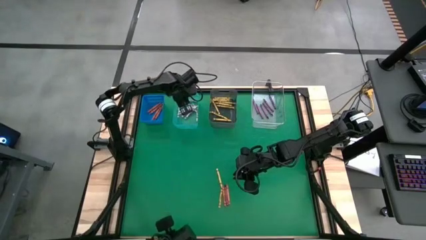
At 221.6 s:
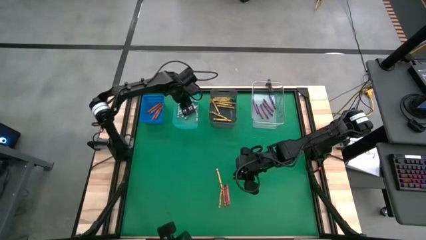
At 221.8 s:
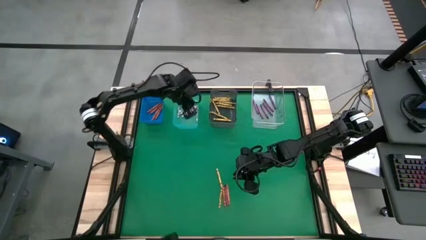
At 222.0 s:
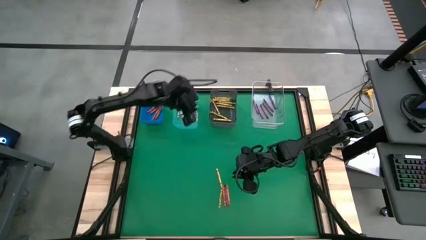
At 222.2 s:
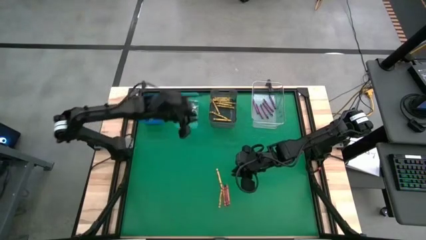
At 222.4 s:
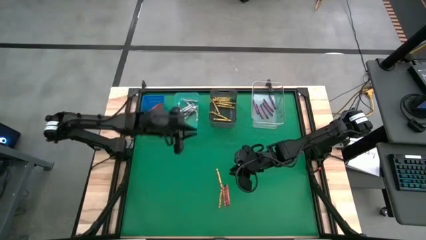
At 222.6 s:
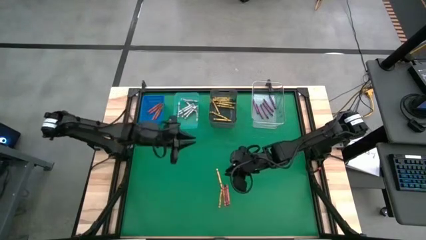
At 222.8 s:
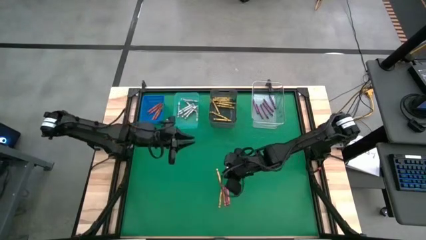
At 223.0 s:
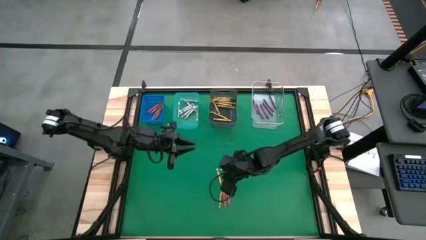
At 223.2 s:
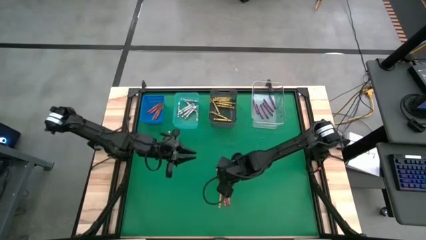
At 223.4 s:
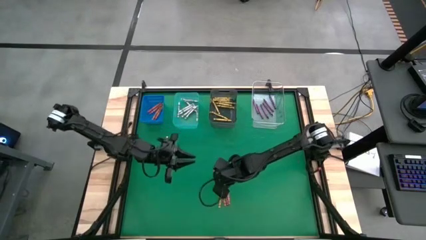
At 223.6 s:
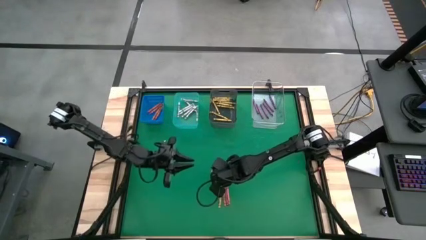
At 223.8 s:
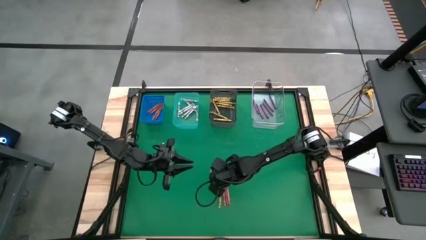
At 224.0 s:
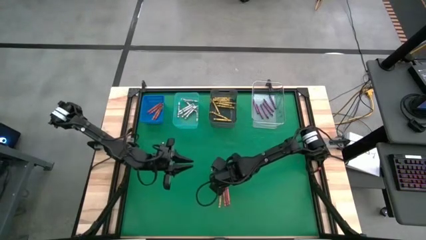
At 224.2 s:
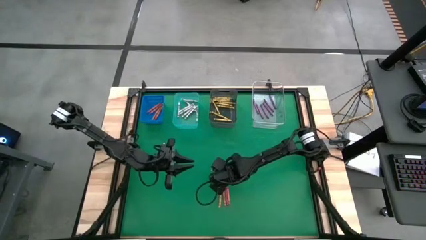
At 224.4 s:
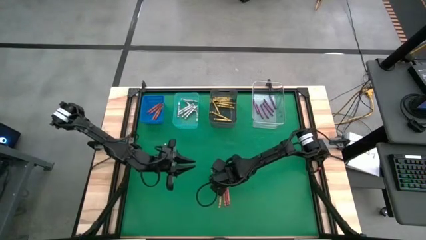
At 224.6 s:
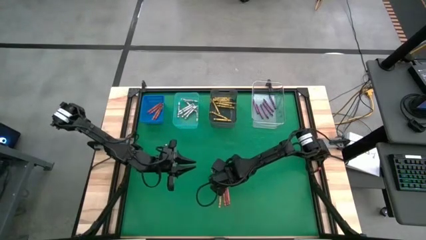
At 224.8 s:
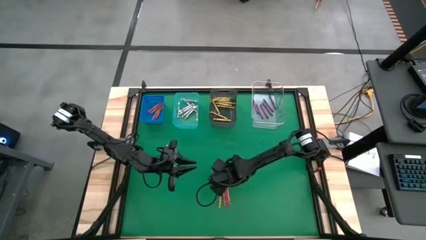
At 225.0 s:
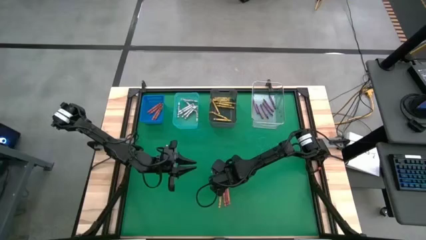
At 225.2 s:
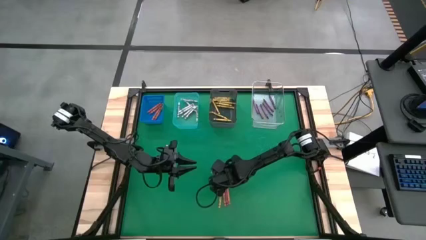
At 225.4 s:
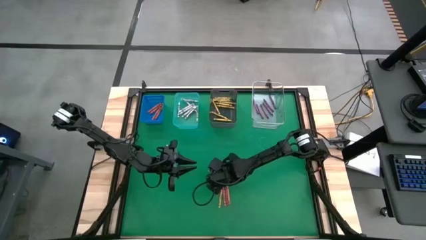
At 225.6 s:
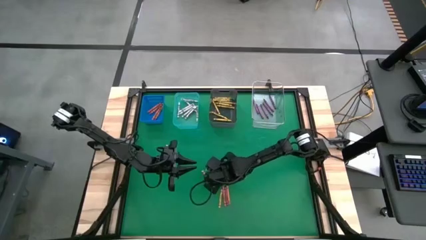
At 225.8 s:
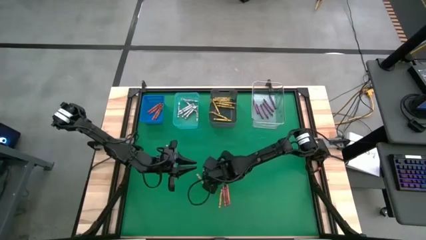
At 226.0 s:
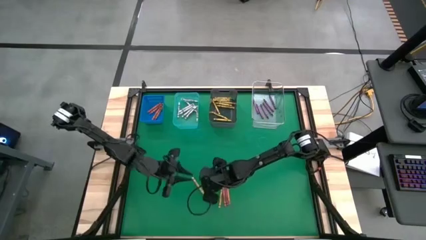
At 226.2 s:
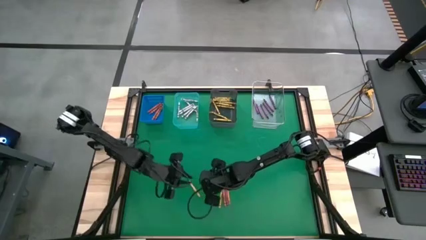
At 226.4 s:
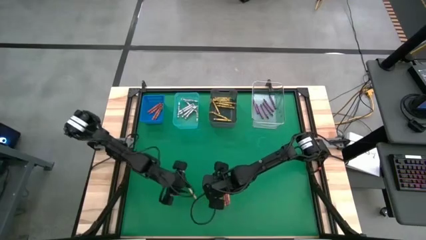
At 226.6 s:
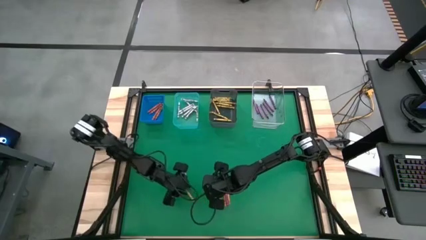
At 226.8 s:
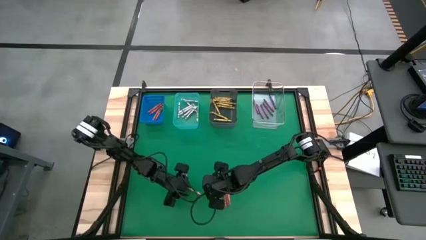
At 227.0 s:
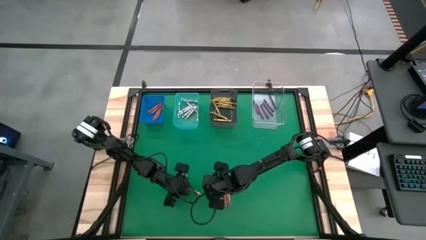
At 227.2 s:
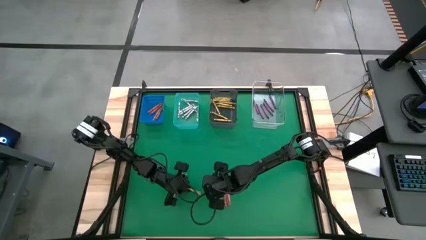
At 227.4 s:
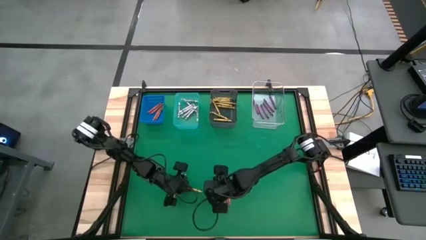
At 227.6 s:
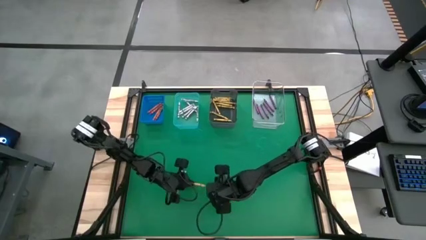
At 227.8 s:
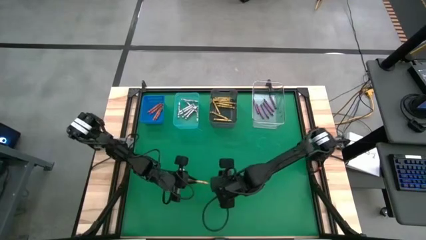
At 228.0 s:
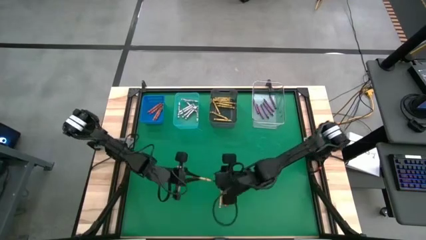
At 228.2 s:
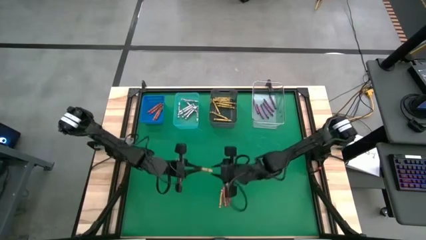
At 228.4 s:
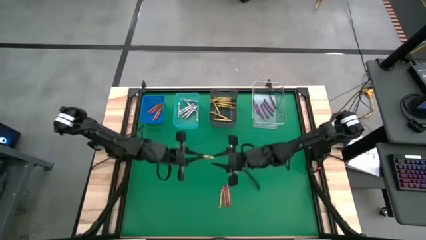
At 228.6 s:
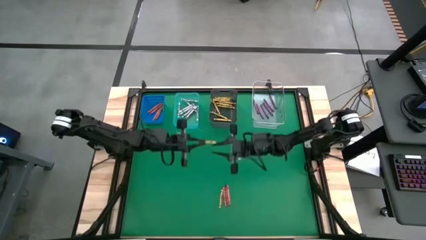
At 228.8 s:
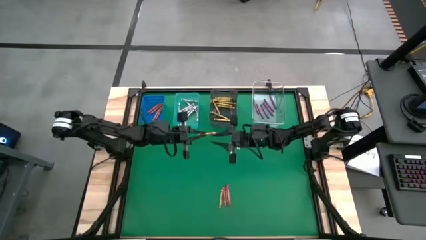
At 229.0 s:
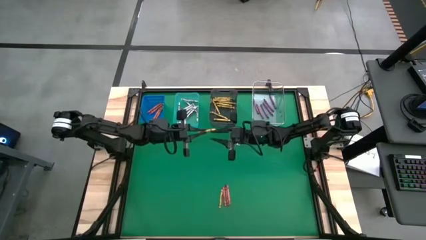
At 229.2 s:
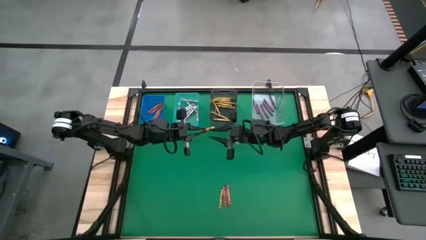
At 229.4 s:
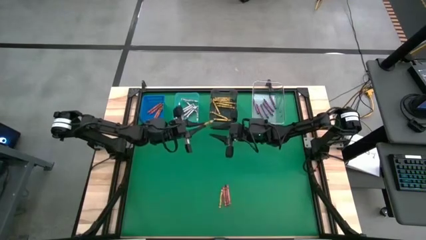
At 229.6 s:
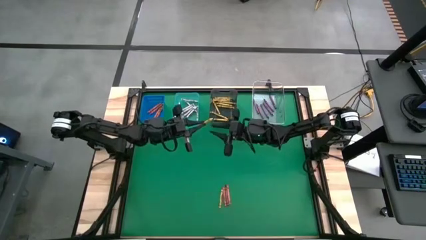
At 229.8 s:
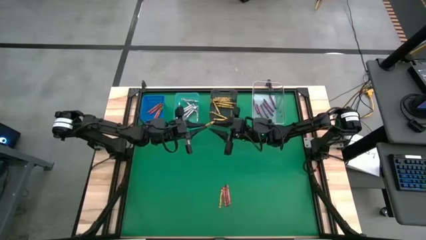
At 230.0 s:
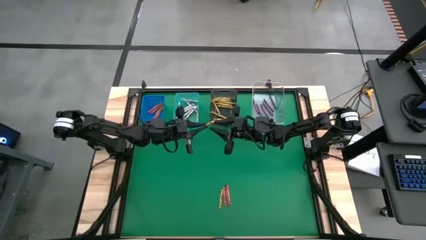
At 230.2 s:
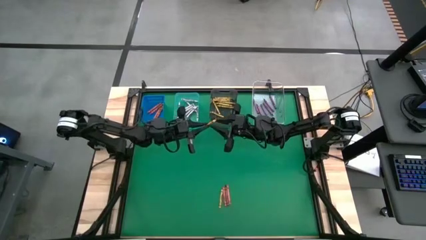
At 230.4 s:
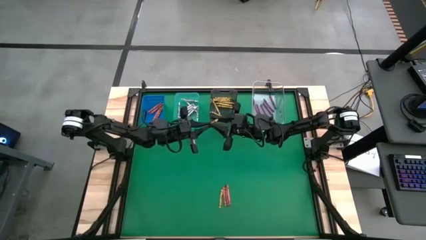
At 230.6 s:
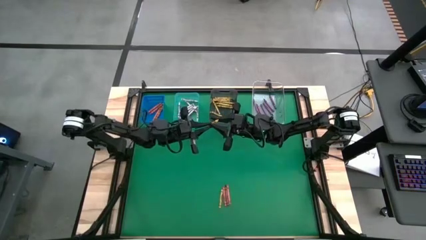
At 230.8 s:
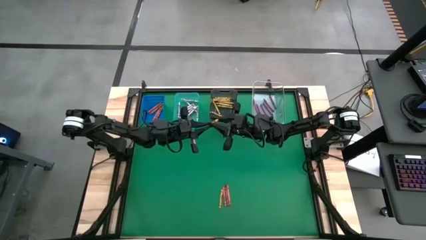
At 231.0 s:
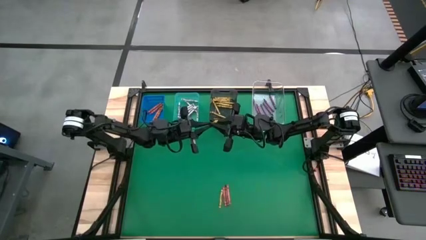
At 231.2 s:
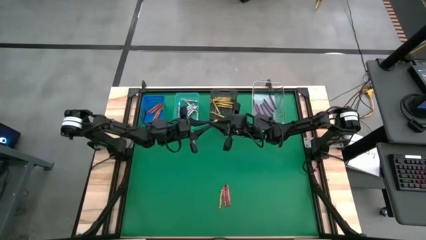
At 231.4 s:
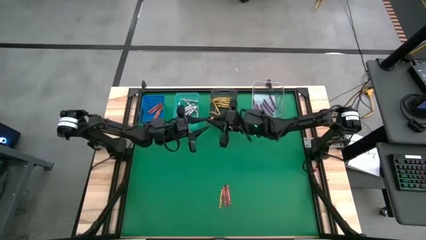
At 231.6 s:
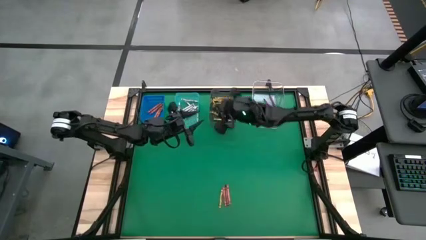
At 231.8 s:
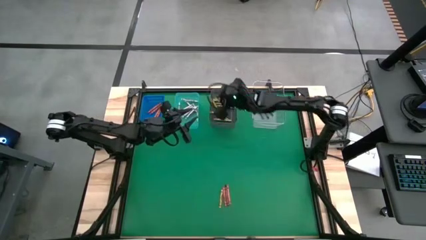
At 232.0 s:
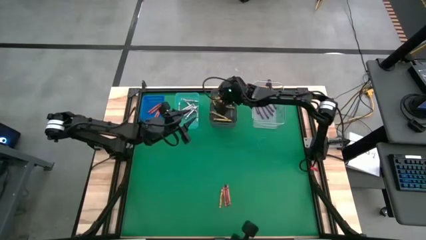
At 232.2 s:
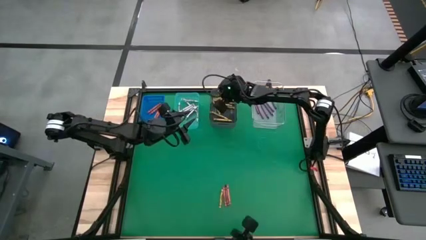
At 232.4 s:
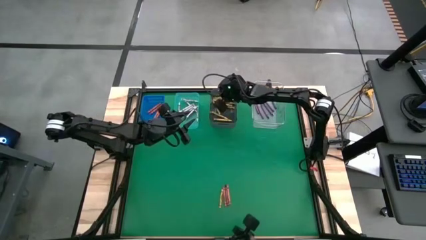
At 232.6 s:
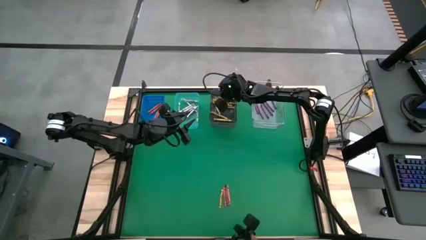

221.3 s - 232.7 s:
Task: Sort crayons
Put the yellow crayon into the black bin
